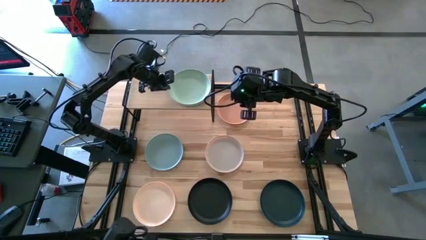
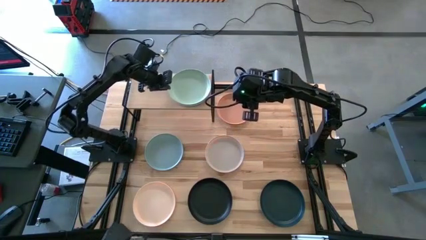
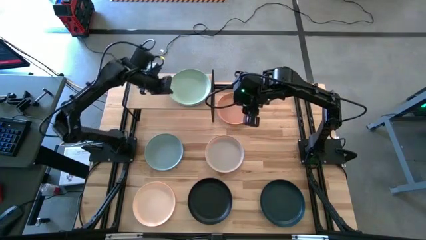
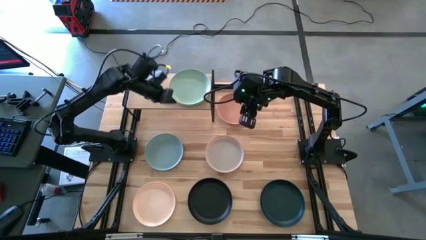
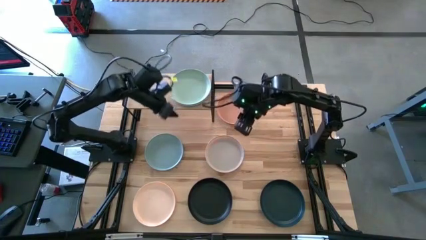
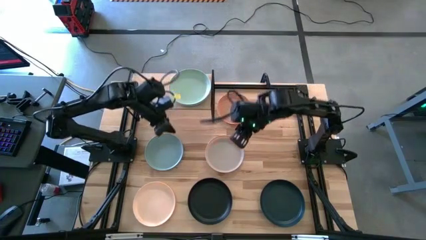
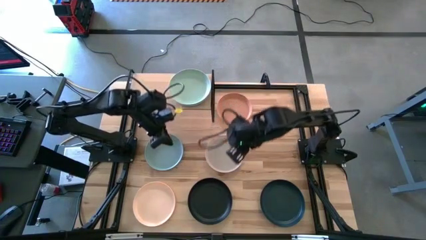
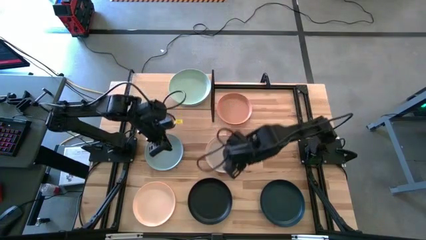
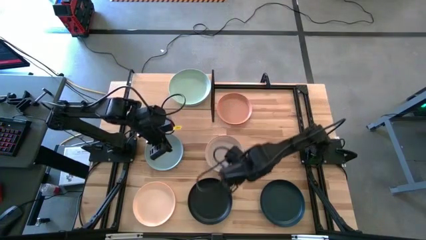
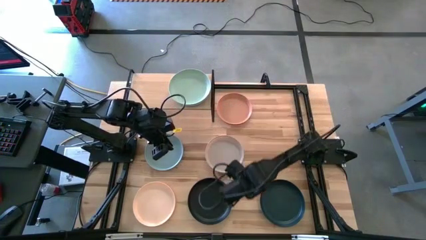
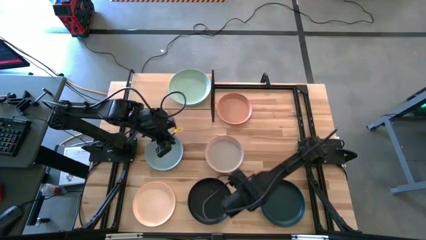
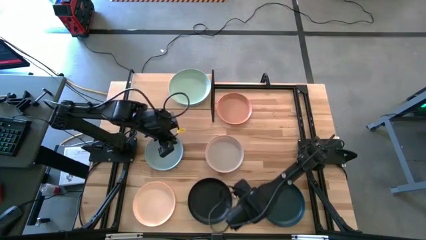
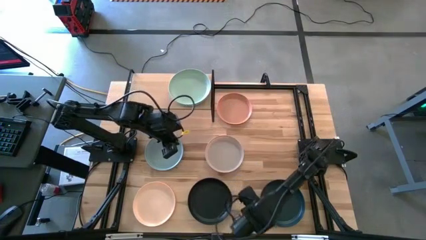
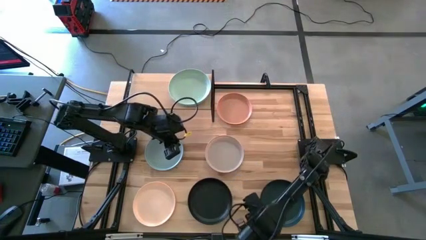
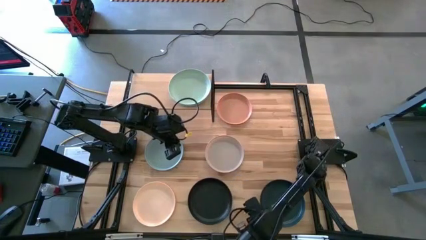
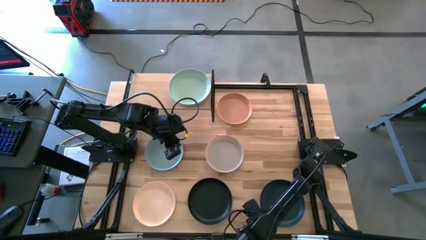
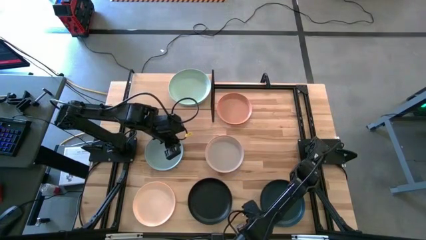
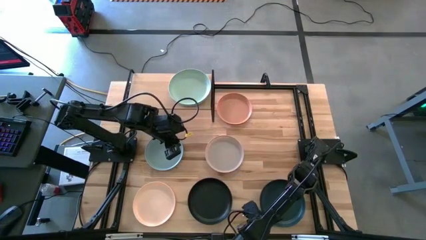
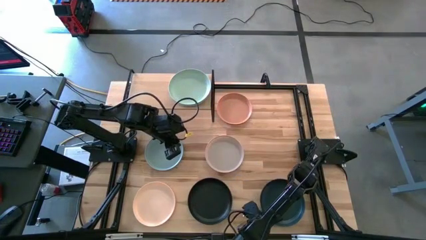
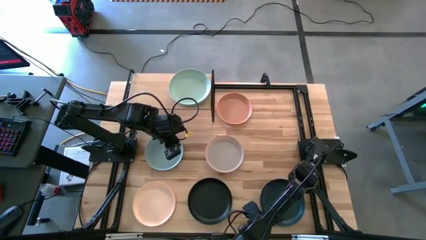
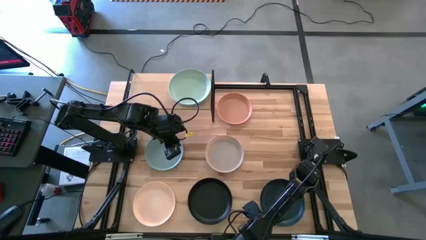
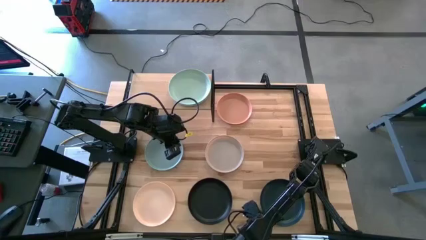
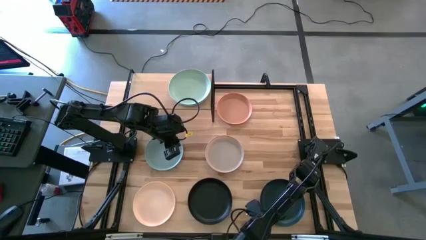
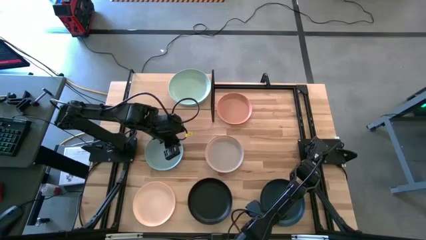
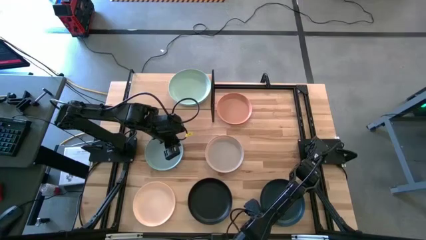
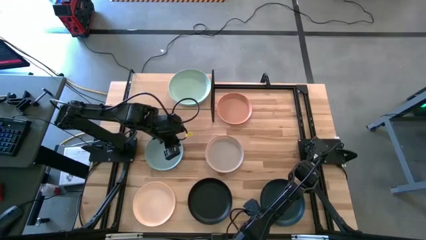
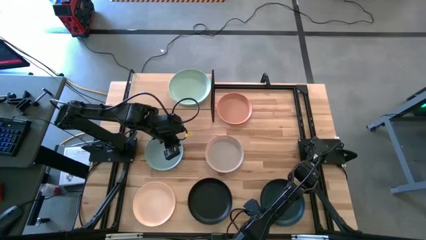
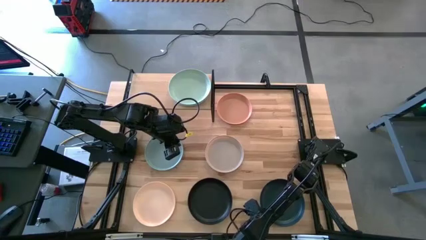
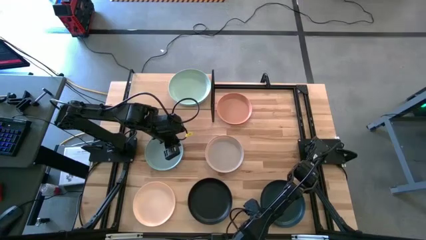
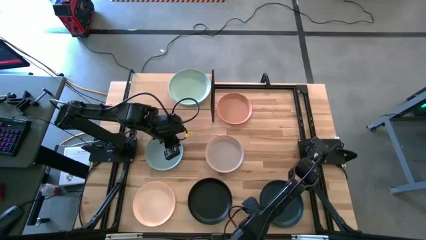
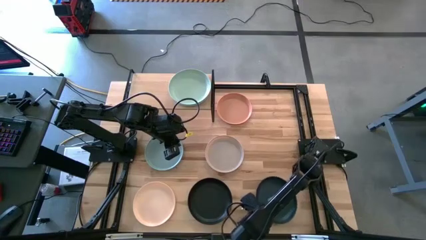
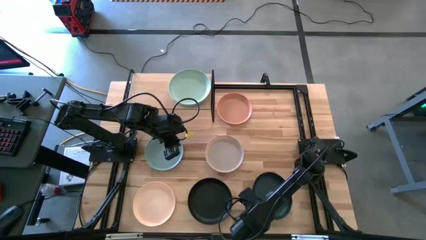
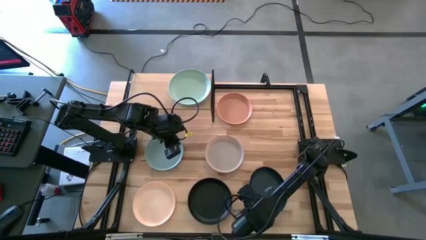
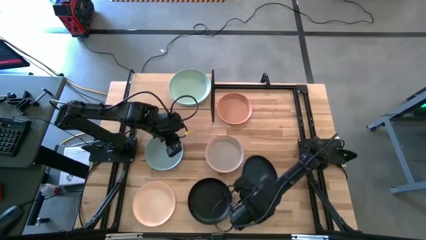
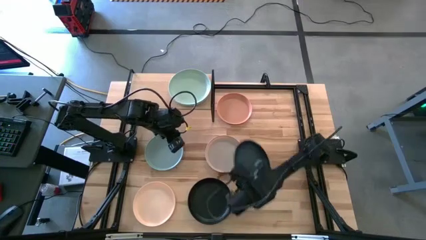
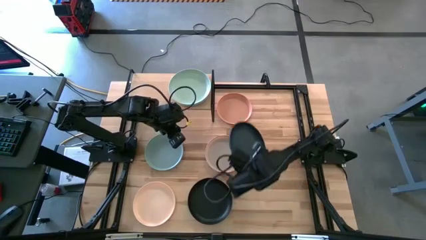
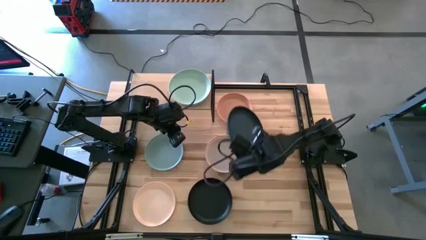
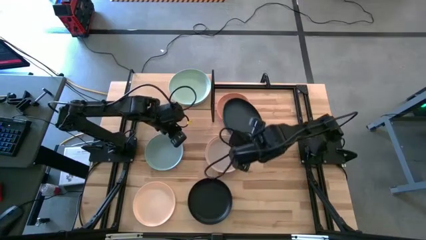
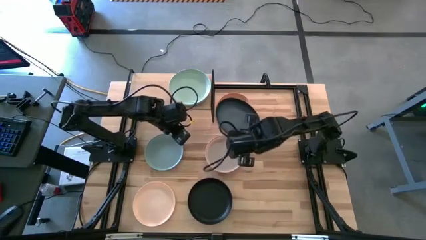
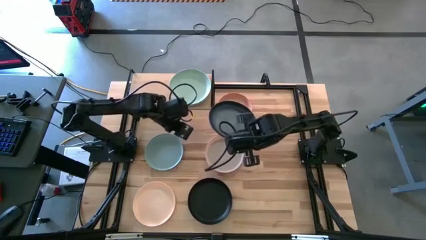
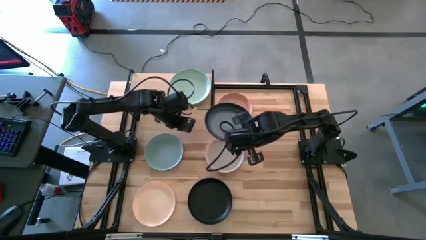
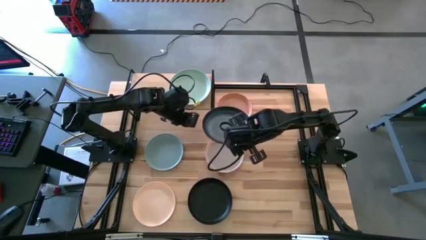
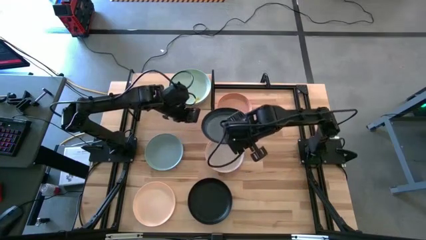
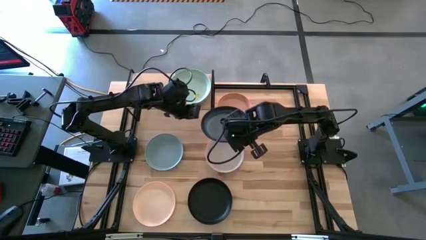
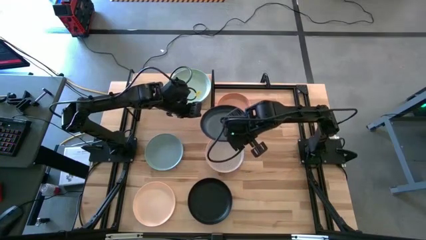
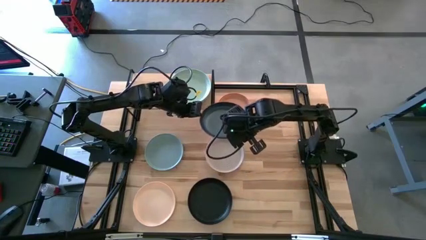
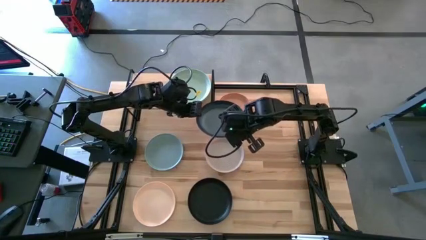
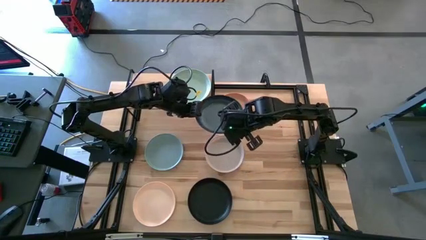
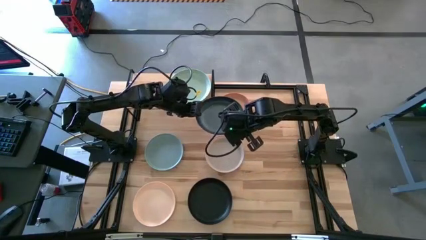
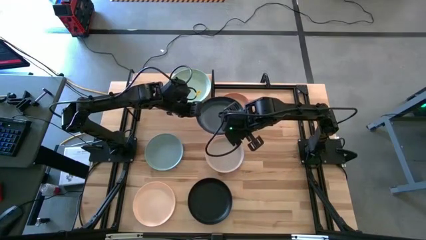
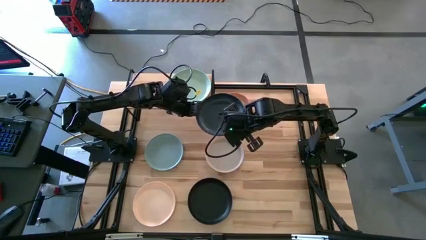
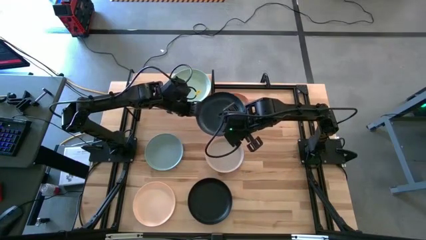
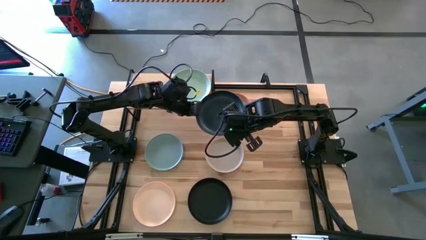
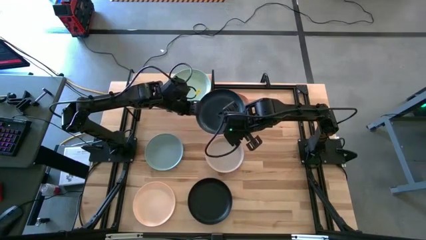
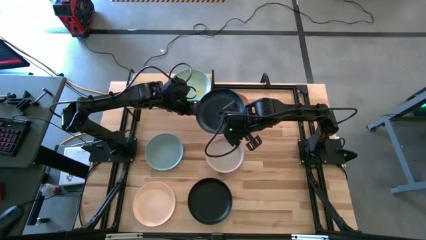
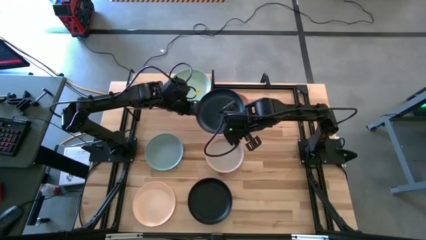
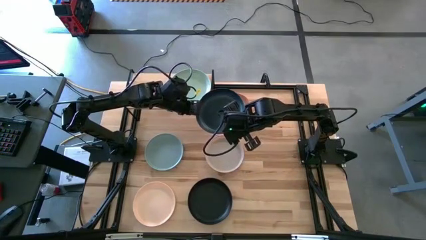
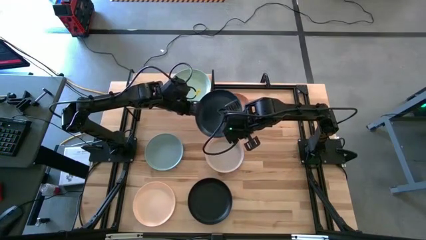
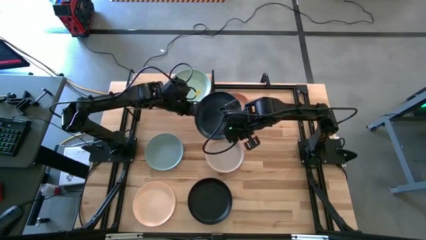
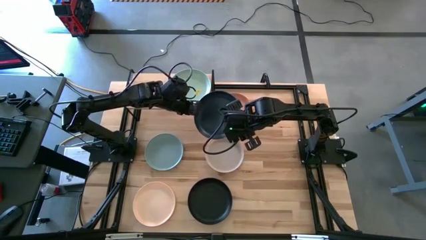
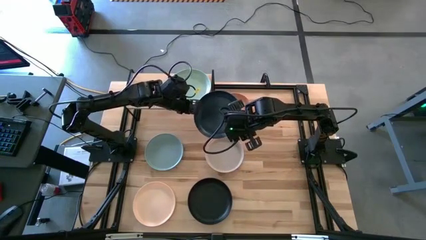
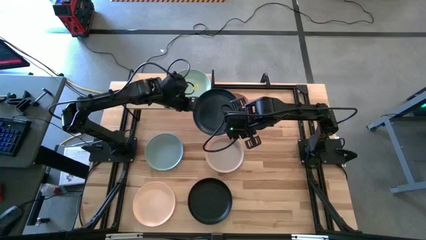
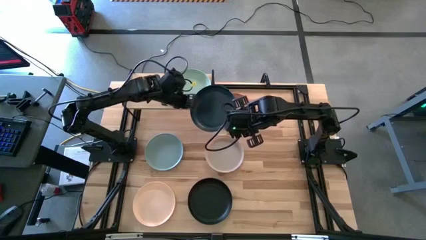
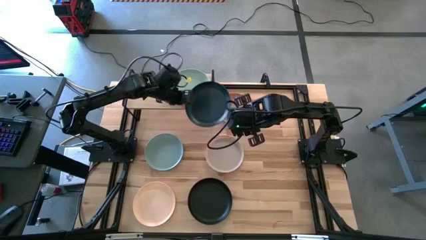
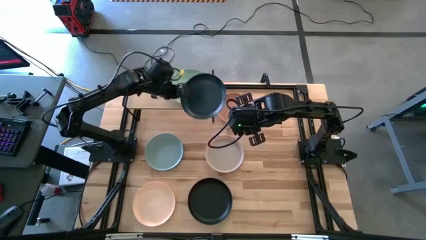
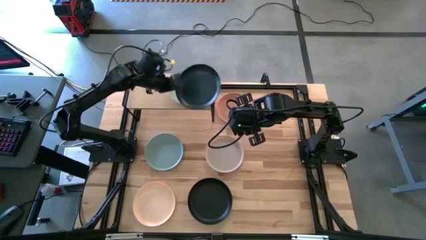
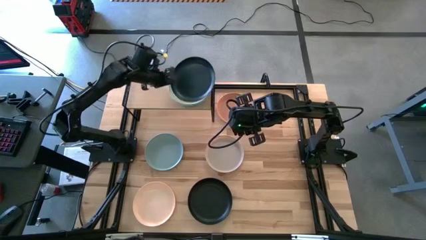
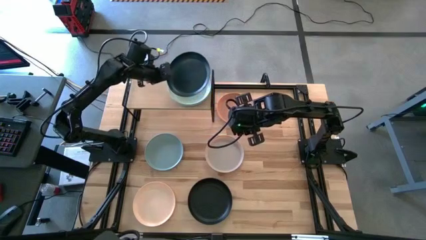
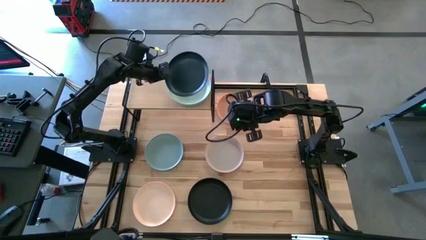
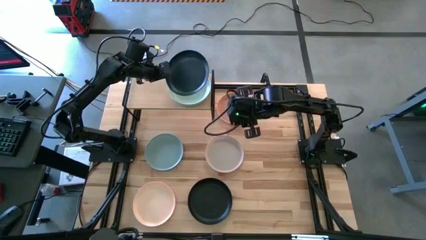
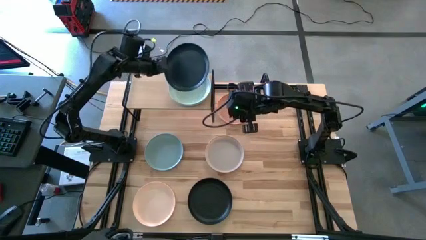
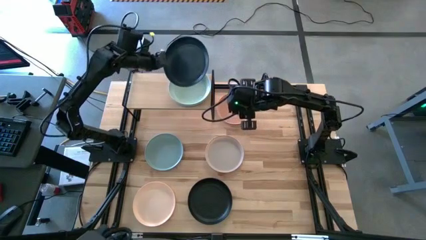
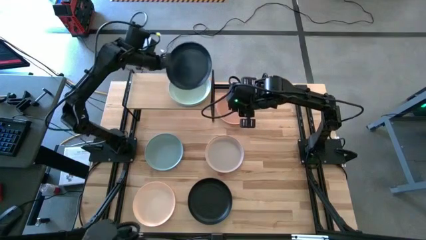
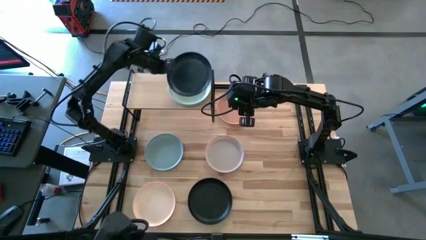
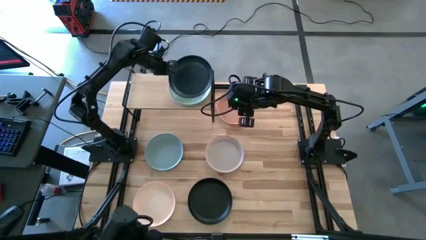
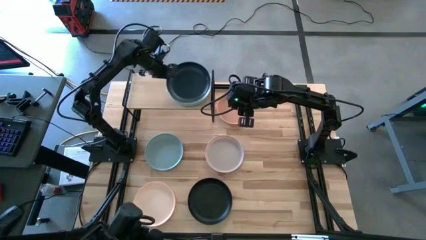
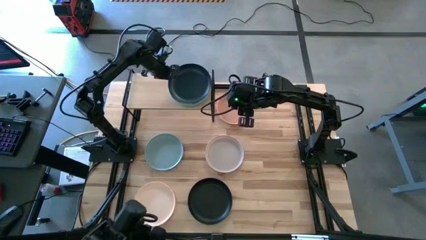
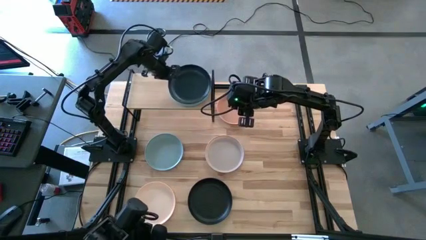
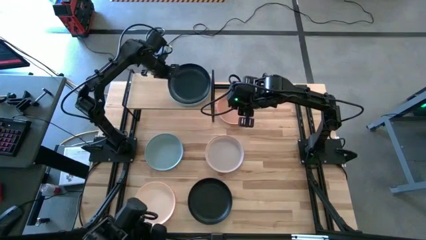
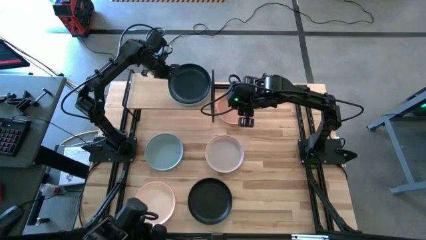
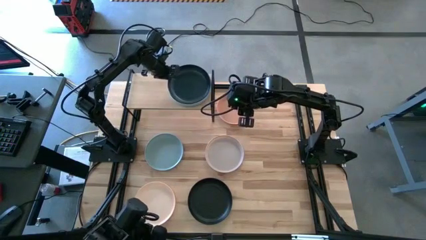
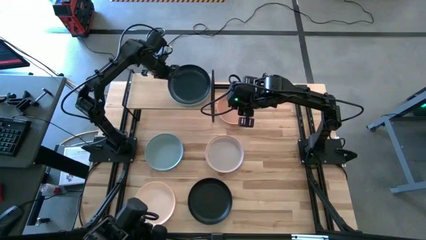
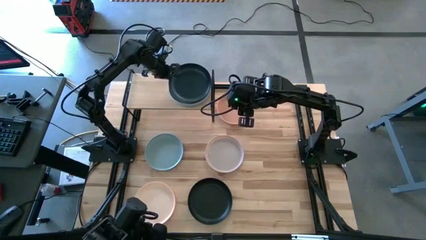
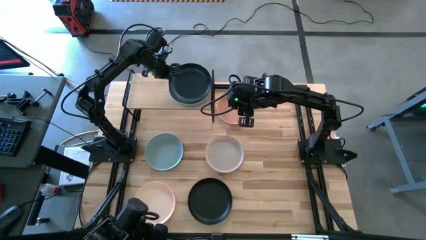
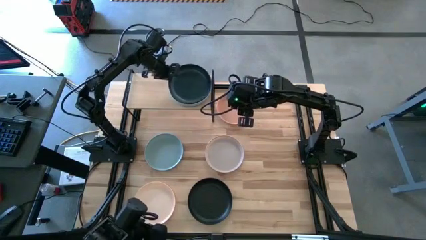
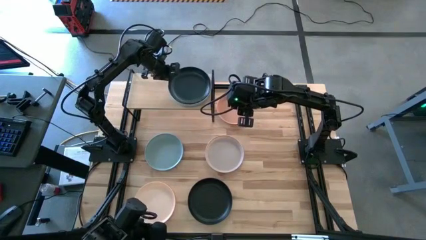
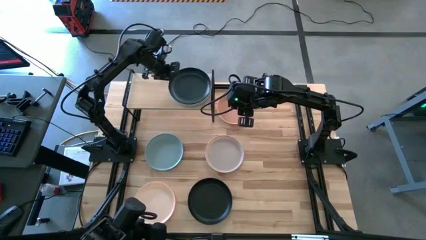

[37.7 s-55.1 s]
Task: Place and stack plates onto a shelf
Stack the dark blue plate on top of the green plate on the shelf
